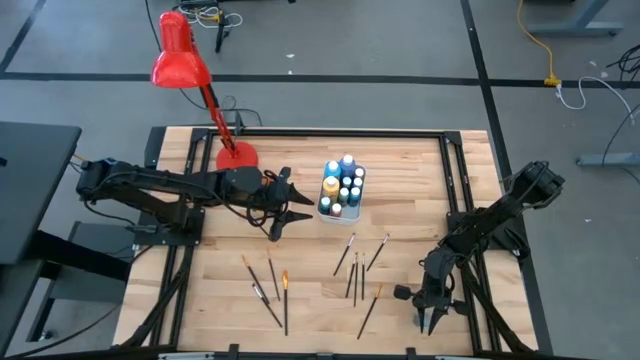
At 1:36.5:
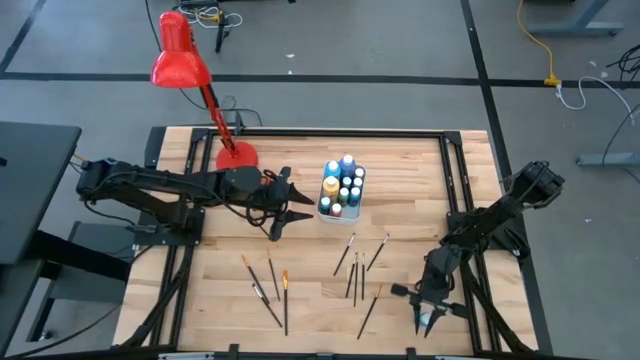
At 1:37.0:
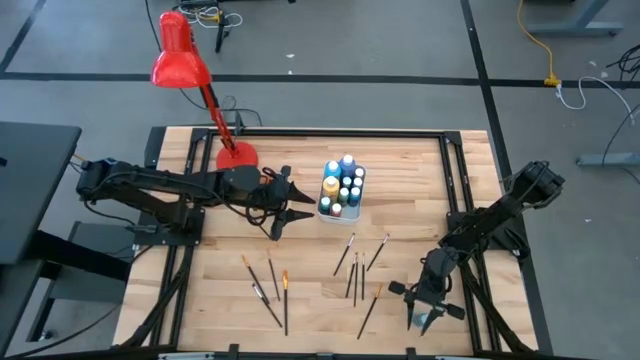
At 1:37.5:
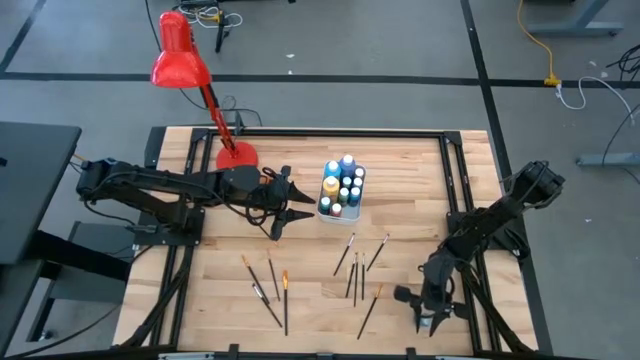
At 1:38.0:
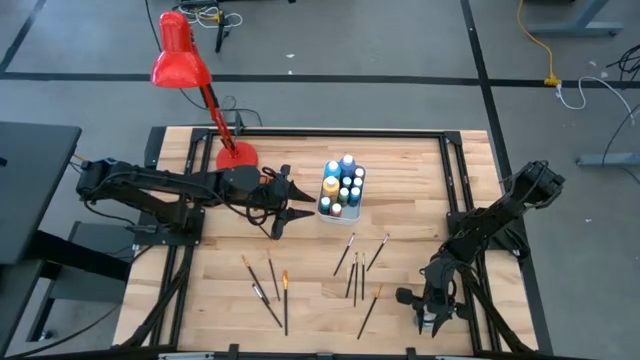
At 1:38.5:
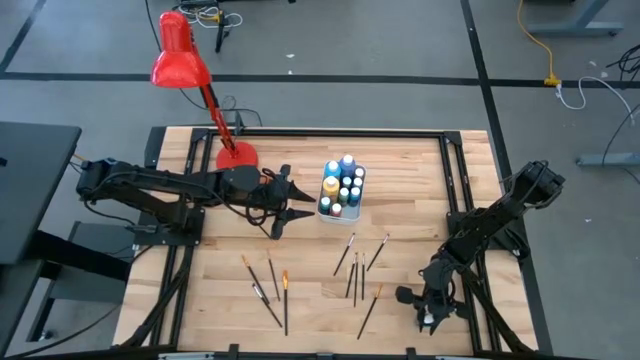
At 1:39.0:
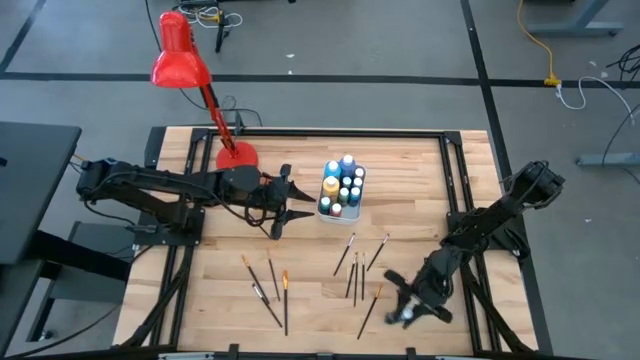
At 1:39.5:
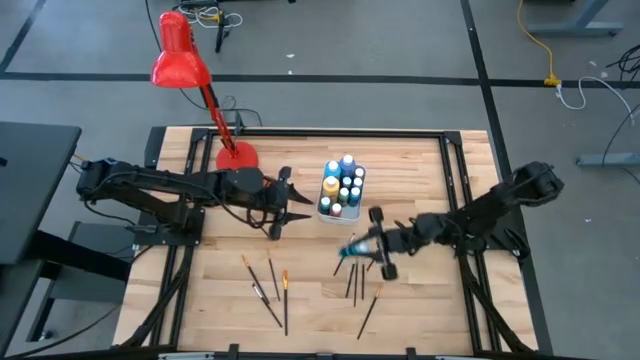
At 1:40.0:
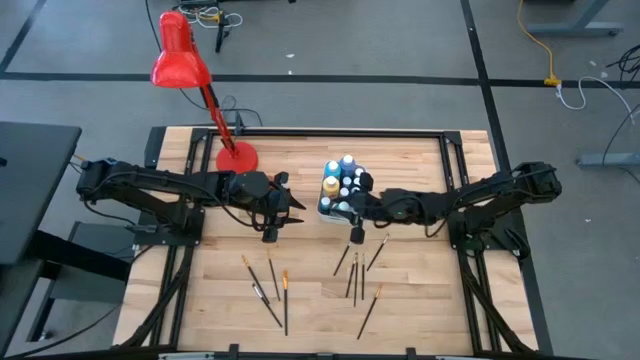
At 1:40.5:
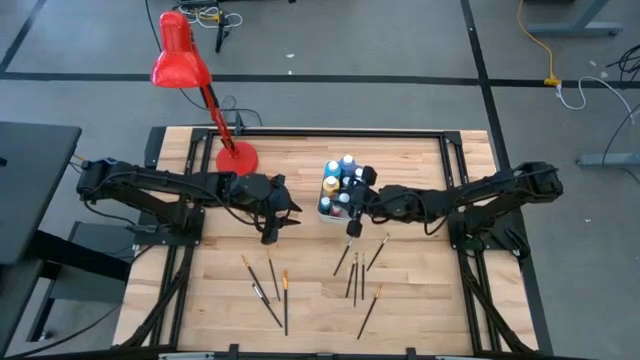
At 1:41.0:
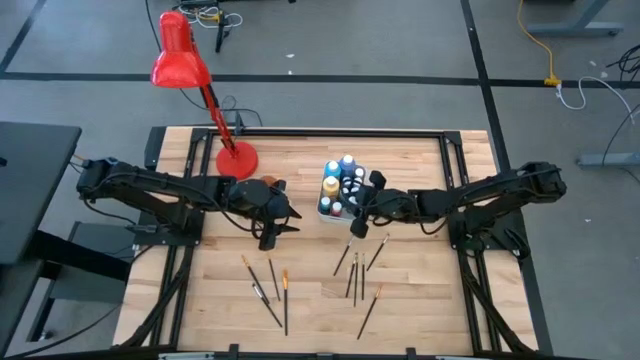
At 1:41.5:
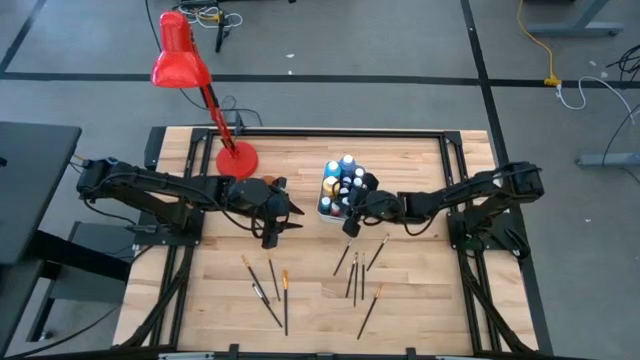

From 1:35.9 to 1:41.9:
Task: Pick & Place Paint Supplies
Put the small dark green paint bottle into the white bin

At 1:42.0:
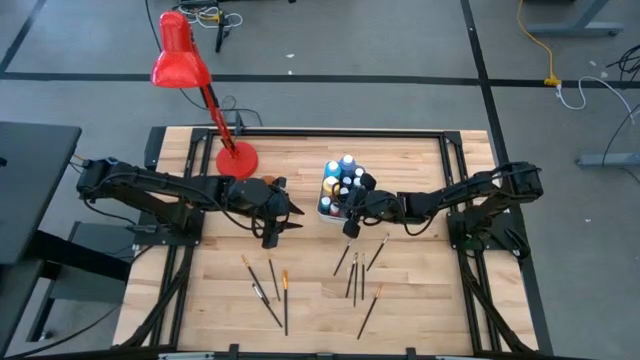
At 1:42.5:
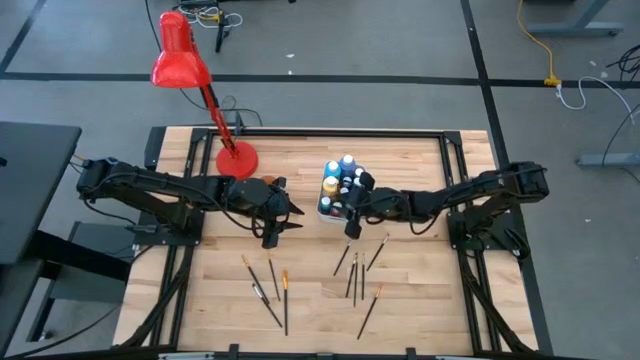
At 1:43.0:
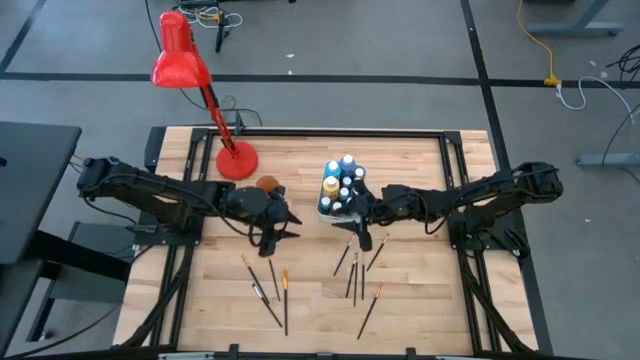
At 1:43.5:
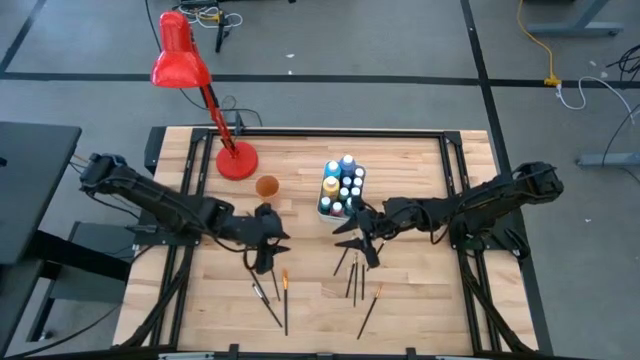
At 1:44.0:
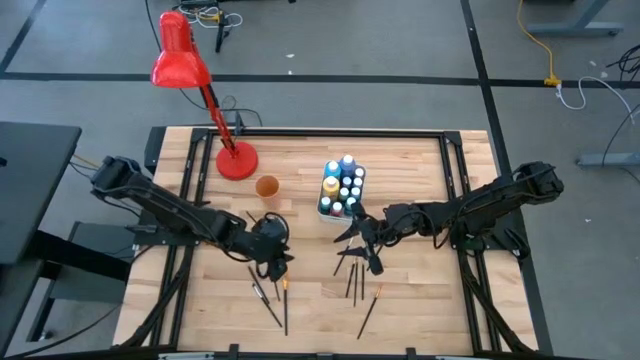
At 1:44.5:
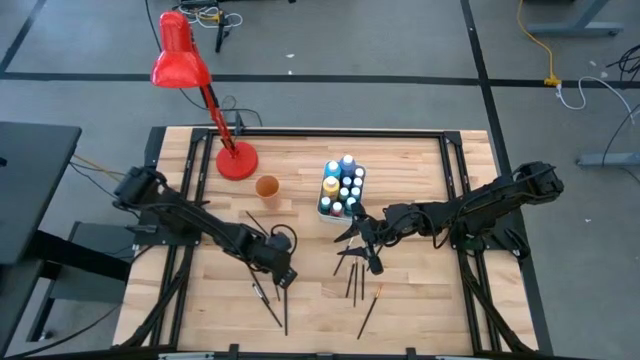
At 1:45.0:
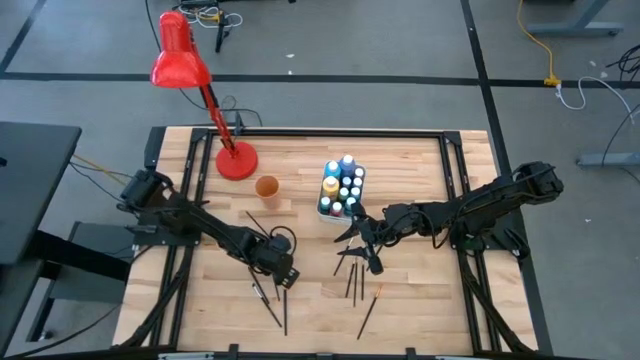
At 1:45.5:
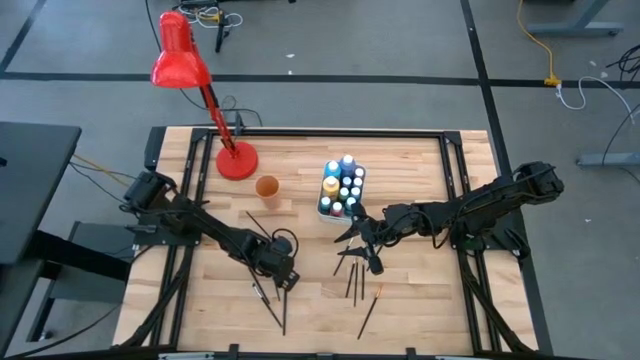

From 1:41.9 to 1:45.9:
Put the yellow paint brush into the orange cup

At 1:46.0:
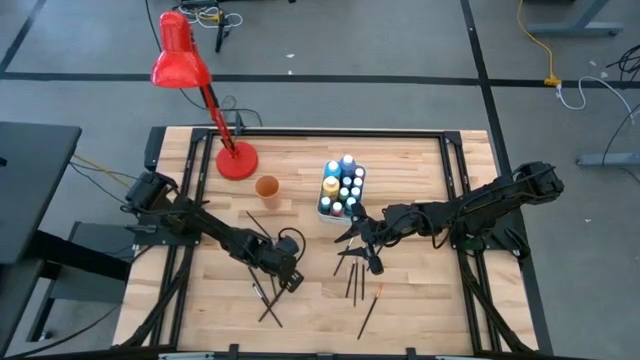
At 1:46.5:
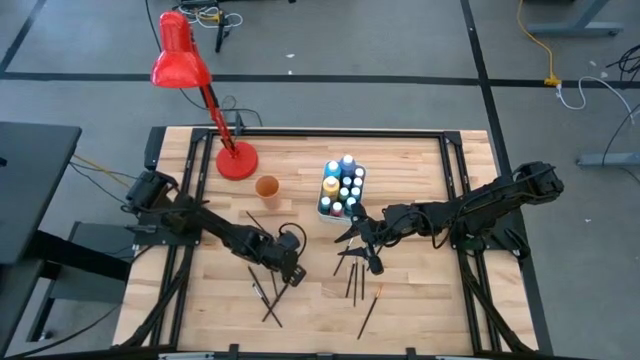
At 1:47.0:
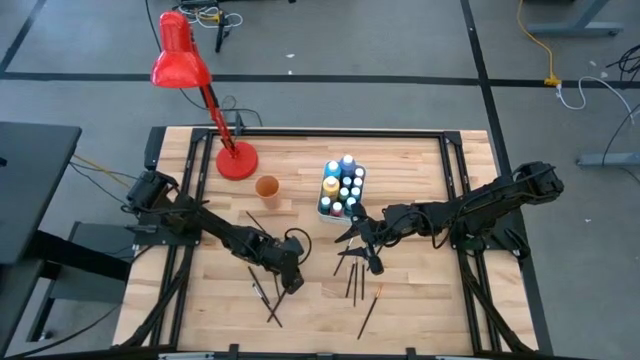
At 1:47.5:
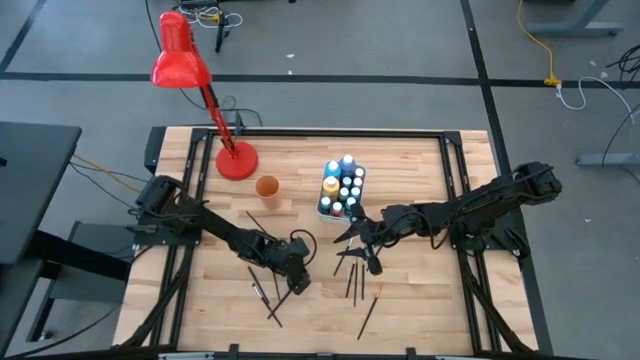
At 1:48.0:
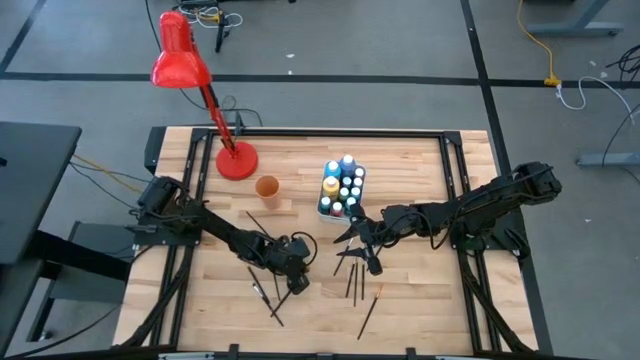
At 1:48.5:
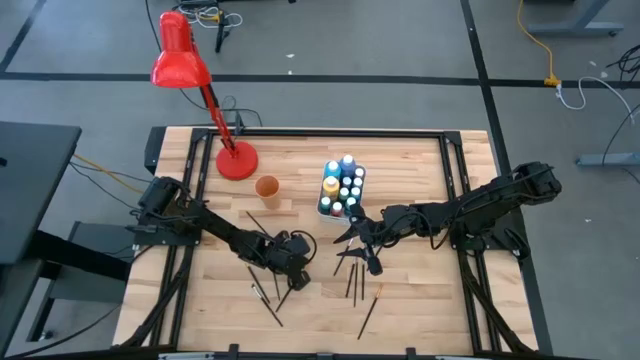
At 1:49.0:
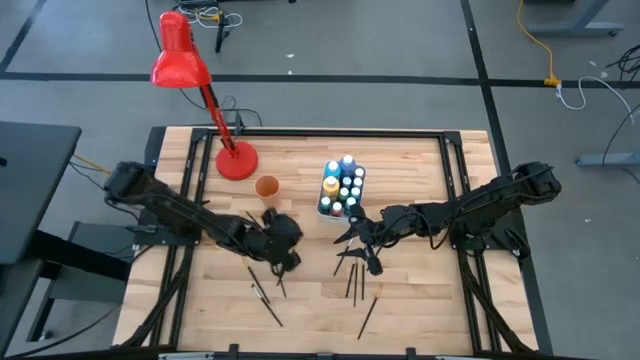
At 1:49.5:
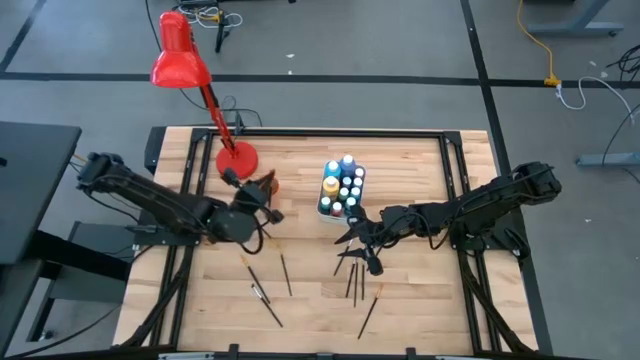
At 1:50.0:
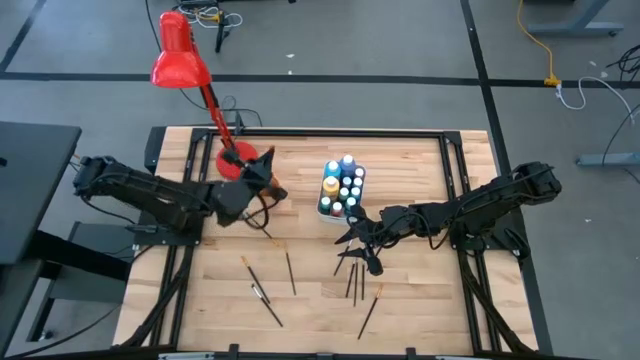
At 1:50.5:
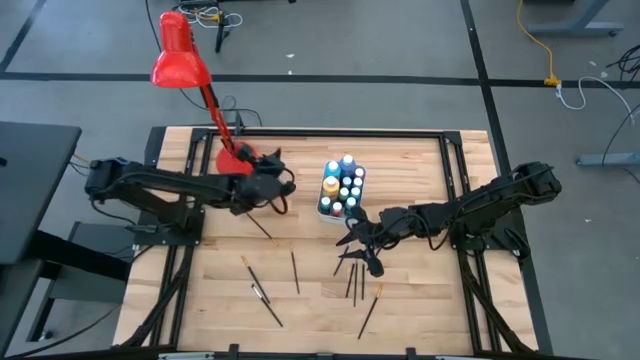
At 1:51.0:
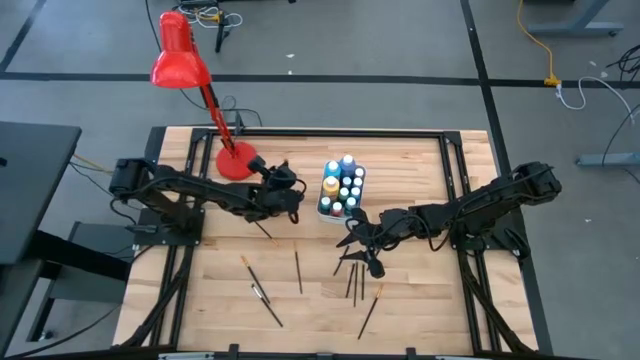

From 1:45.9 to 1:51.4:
Put the yellow paint brush into the orange cup

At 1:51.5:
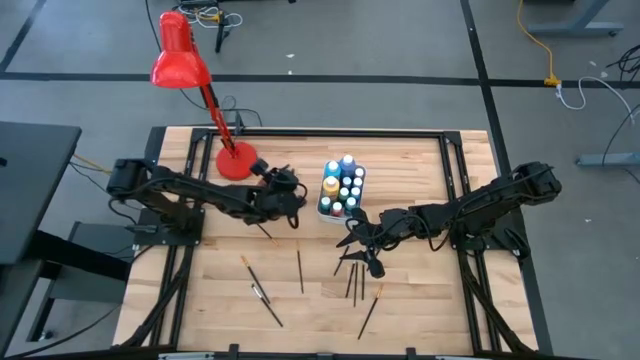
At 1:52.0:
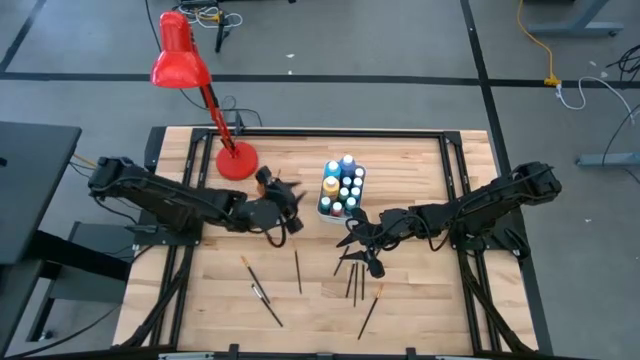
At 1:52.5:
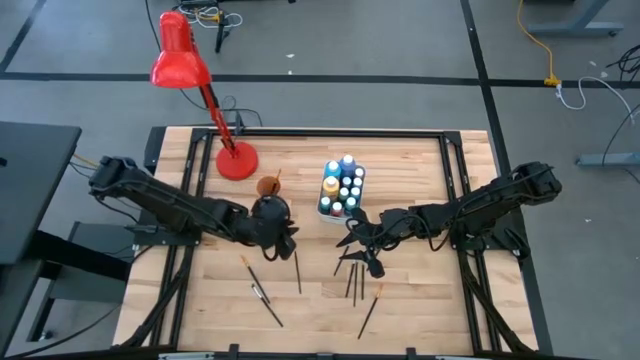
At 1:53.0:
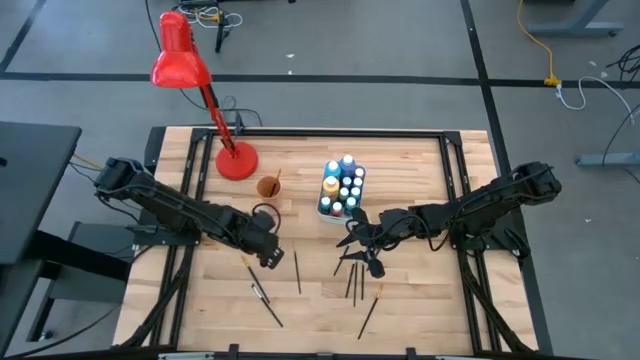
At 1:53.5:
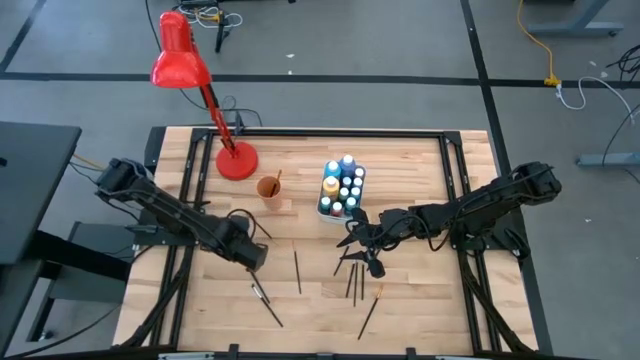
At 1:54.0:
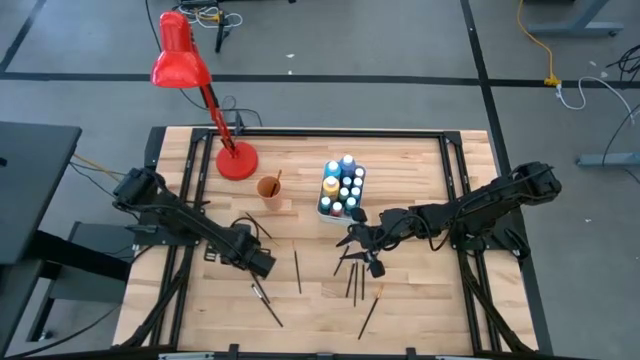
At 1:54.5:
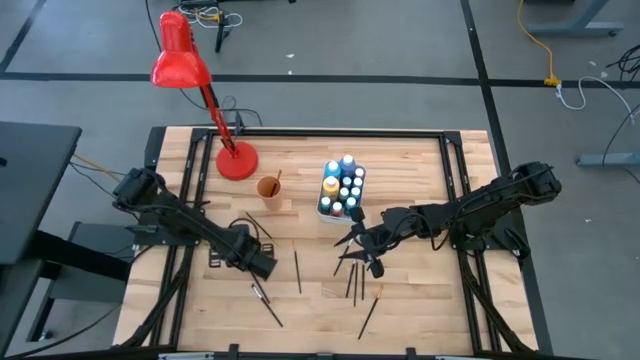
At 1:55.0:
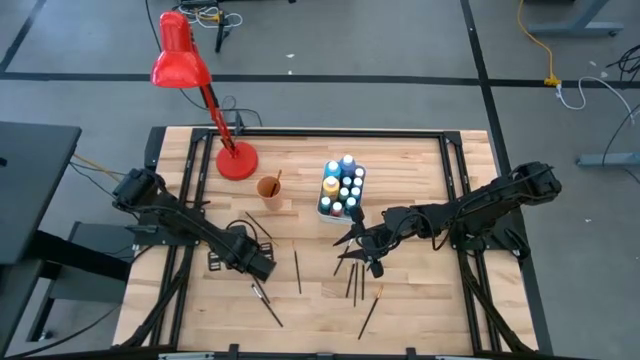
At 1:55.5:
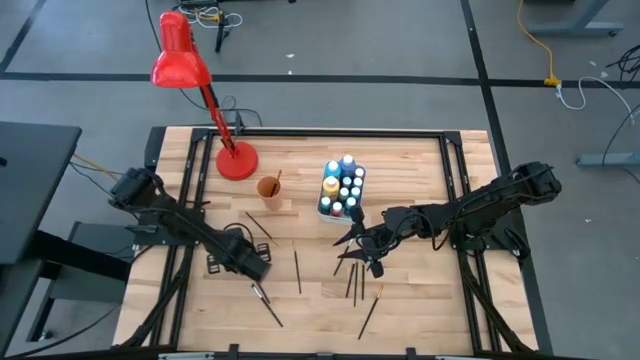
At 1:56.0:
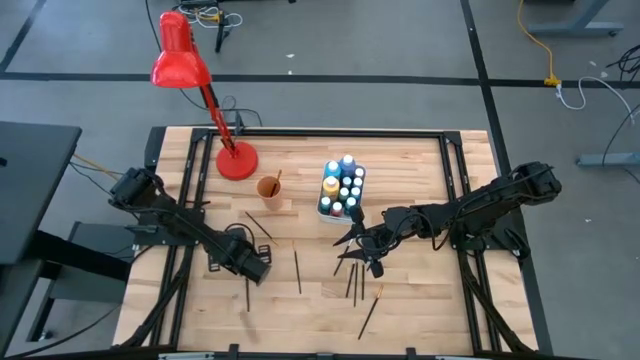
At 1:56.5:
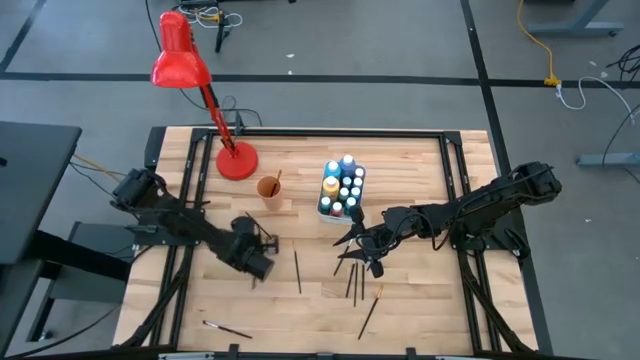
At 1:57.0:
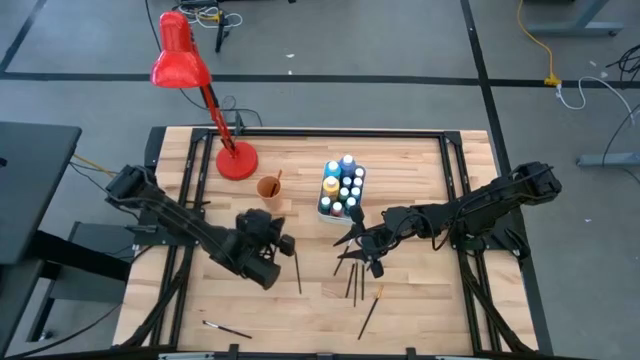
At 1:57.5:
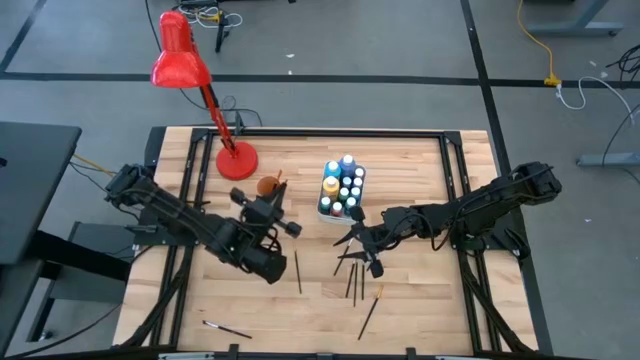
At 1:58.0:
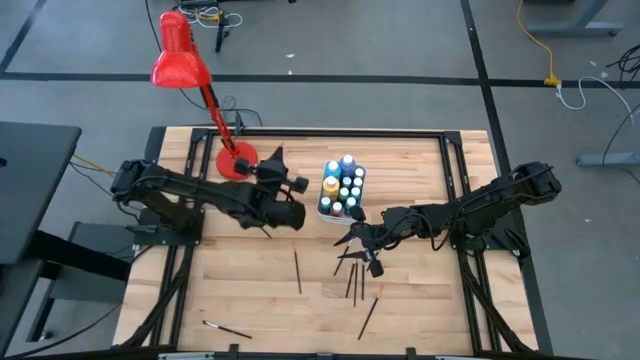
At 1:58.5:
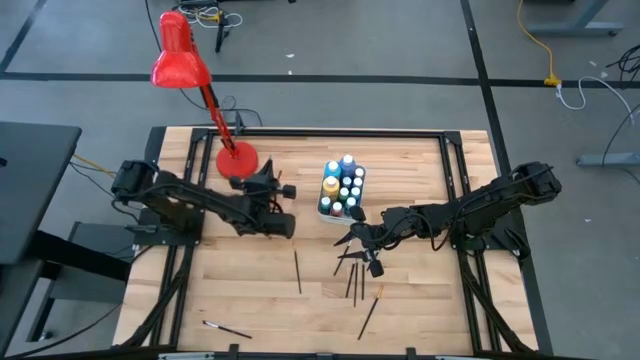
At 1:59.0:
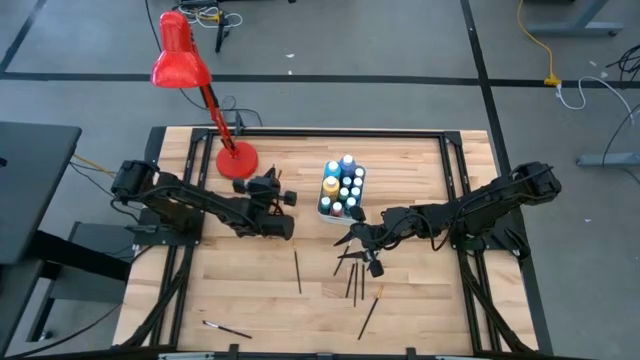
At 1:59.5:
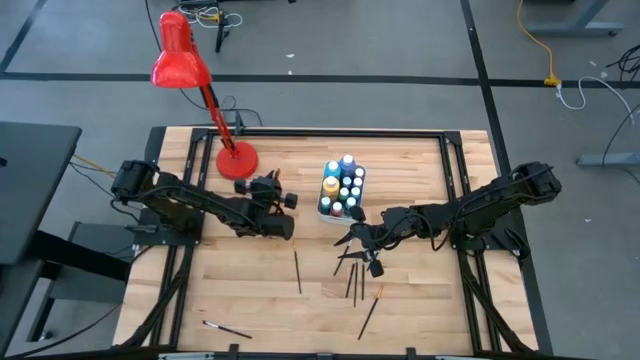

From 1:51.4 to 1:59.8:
Put the yellow paint brush into the orange cup
